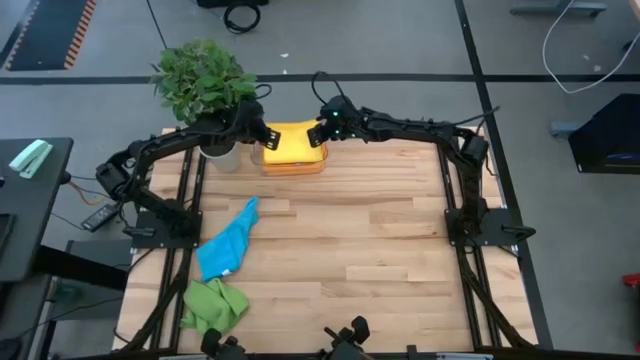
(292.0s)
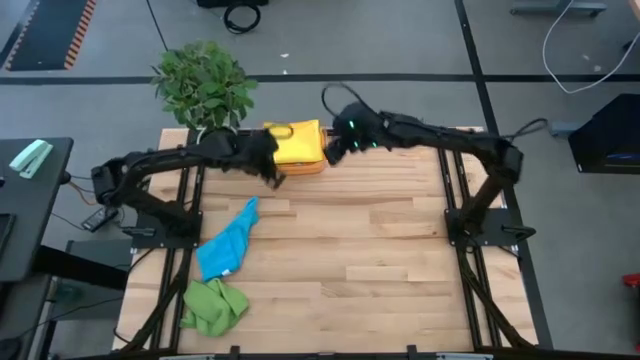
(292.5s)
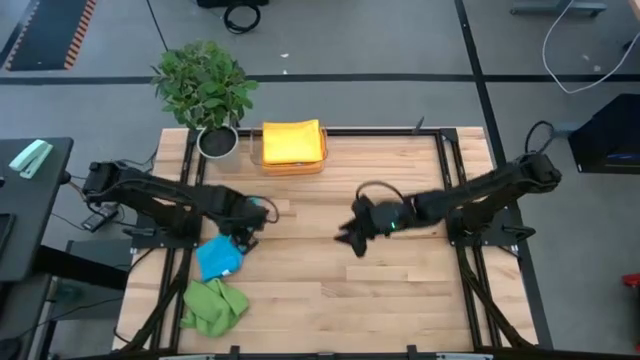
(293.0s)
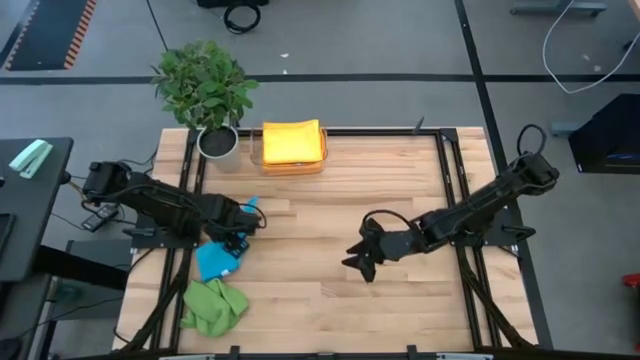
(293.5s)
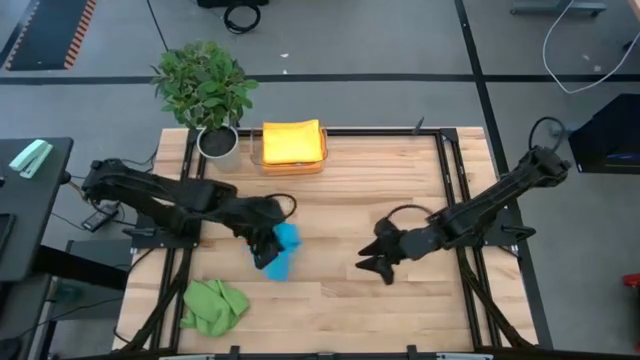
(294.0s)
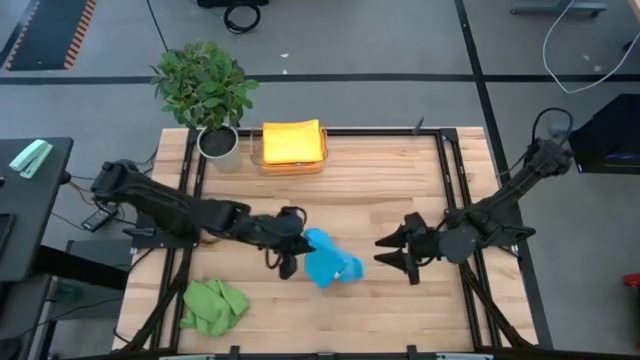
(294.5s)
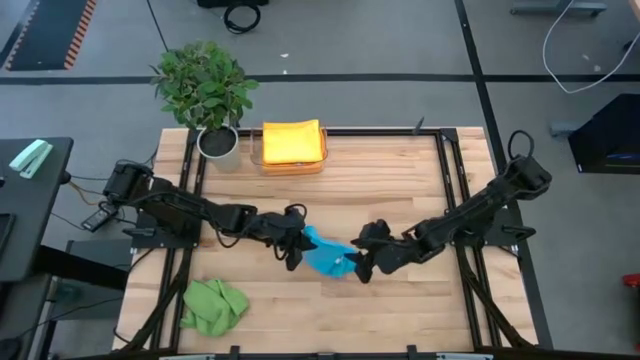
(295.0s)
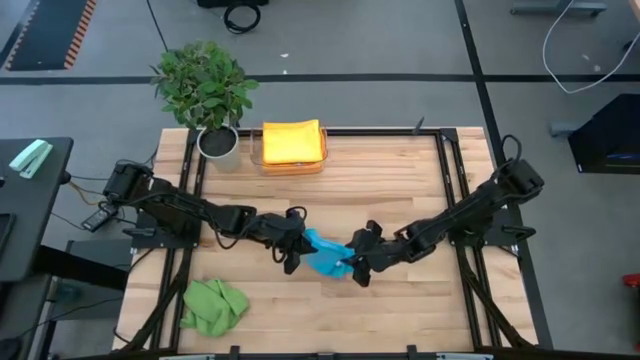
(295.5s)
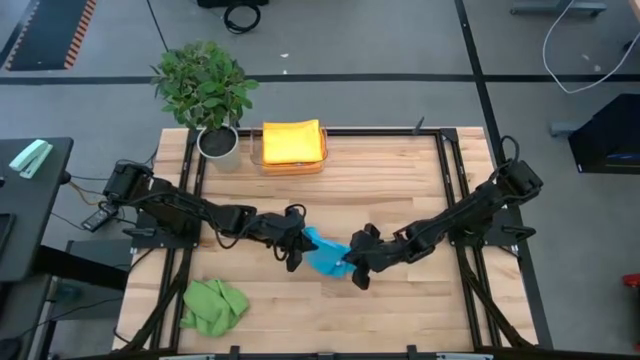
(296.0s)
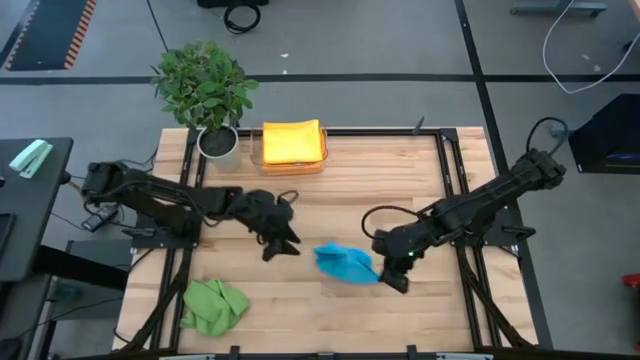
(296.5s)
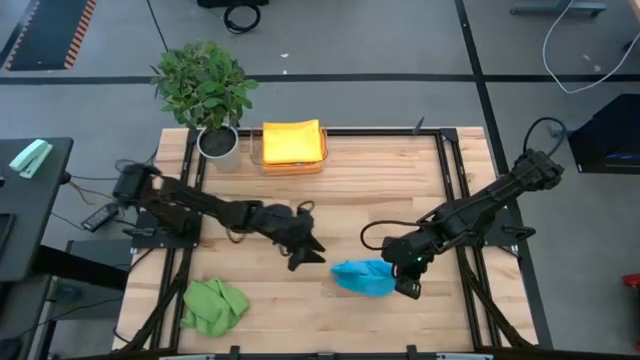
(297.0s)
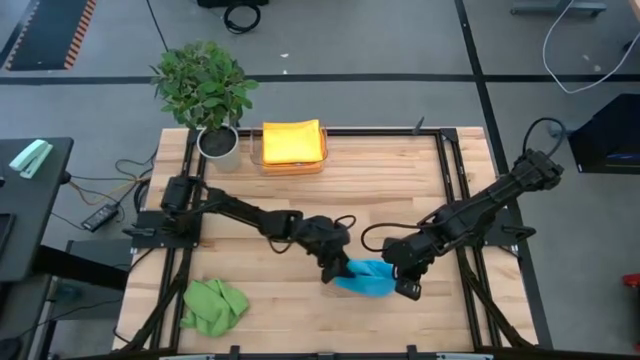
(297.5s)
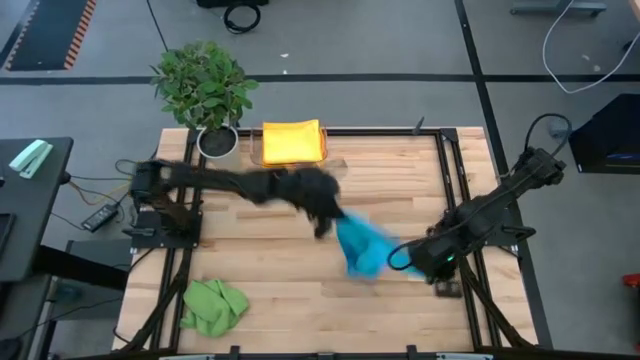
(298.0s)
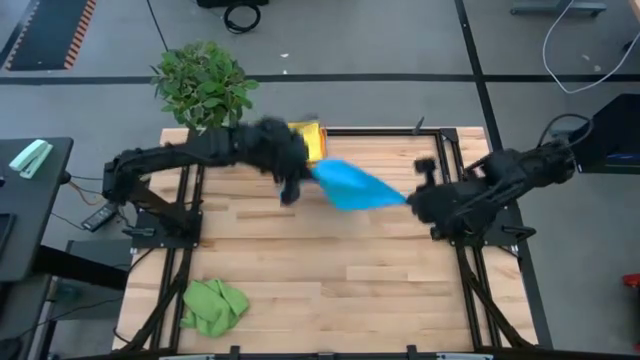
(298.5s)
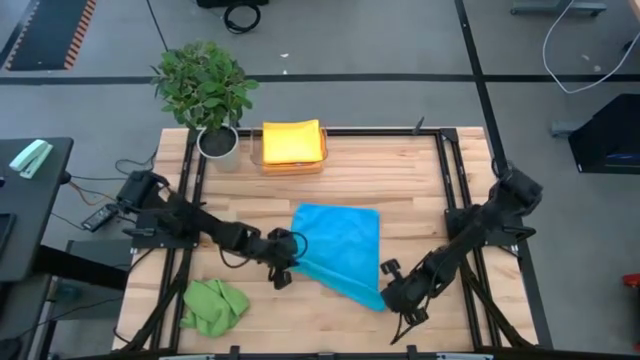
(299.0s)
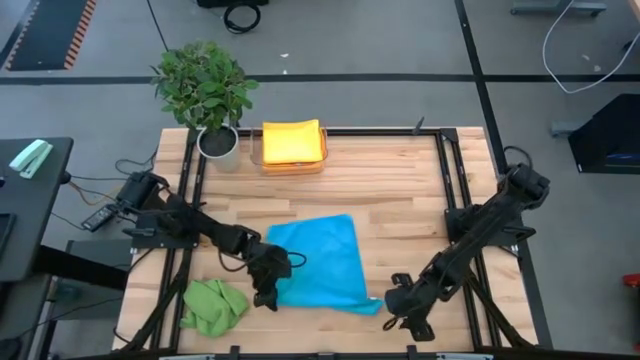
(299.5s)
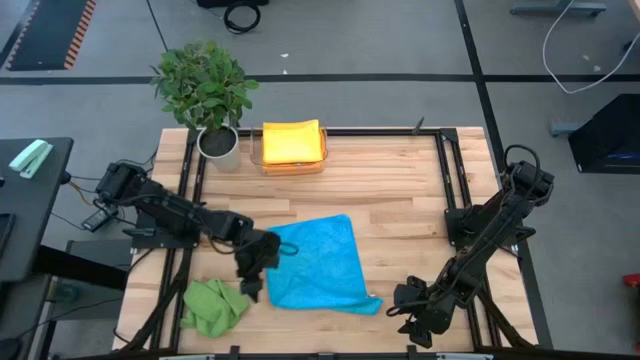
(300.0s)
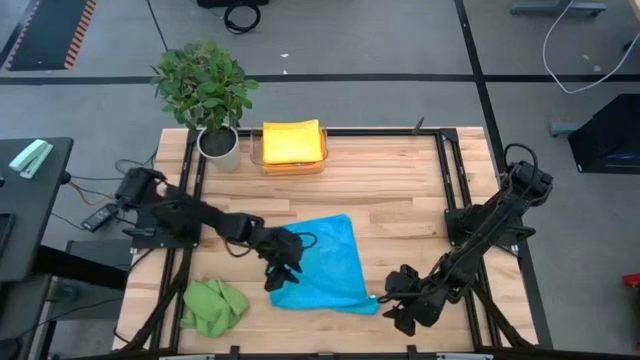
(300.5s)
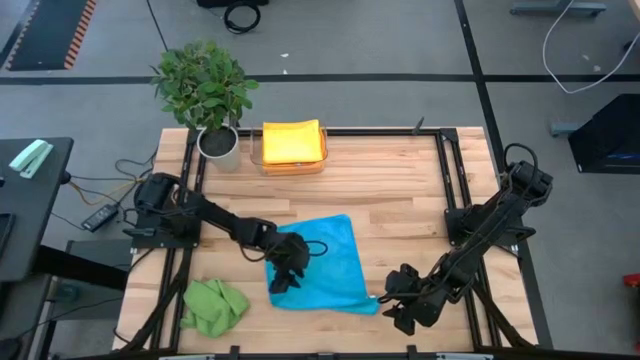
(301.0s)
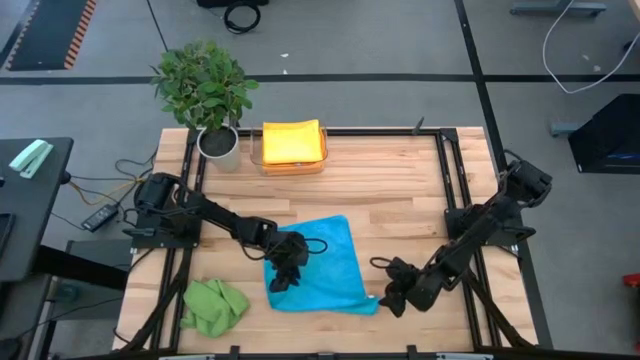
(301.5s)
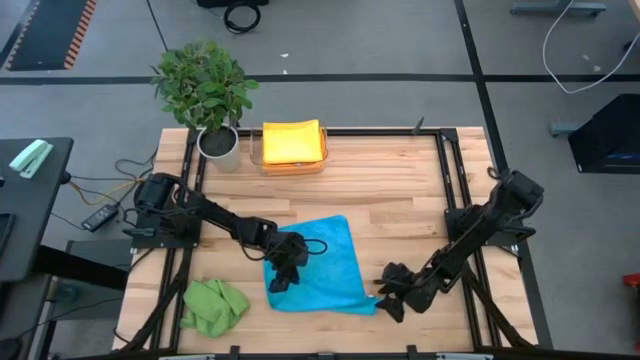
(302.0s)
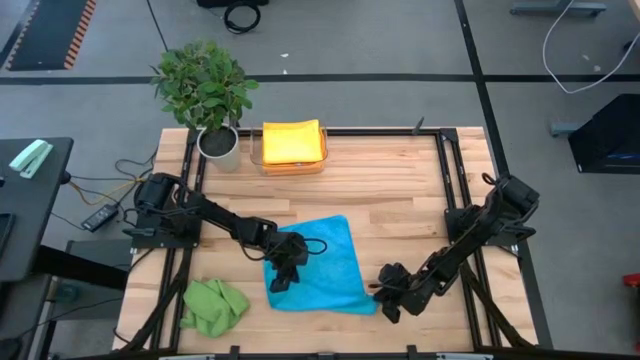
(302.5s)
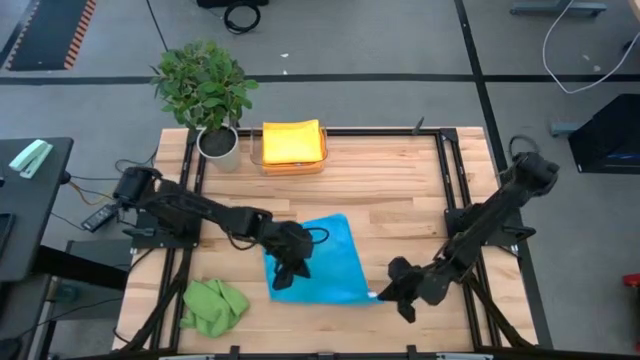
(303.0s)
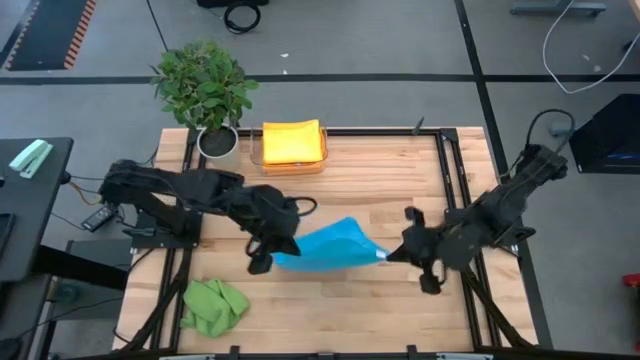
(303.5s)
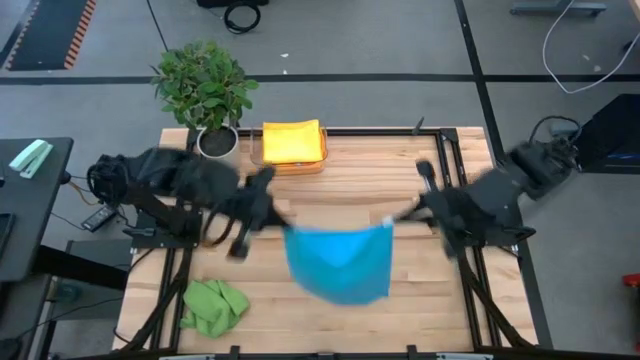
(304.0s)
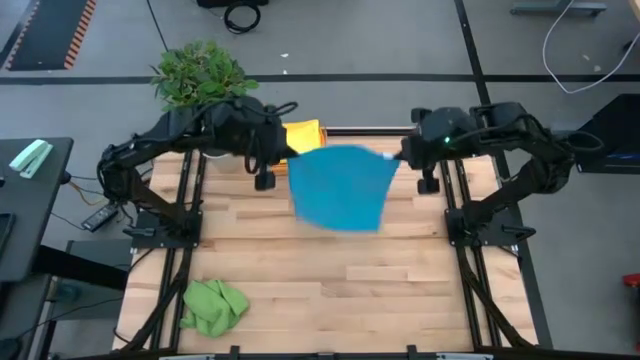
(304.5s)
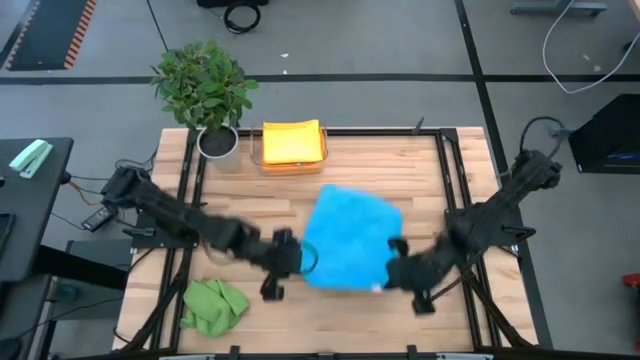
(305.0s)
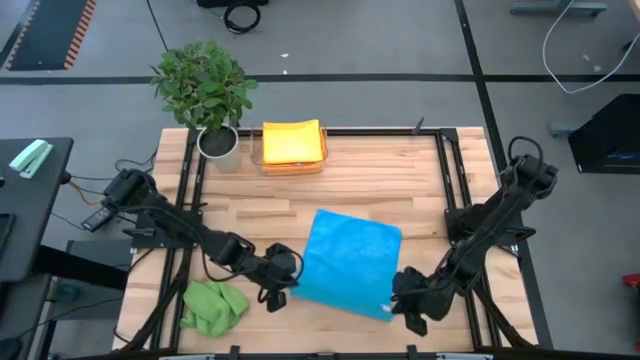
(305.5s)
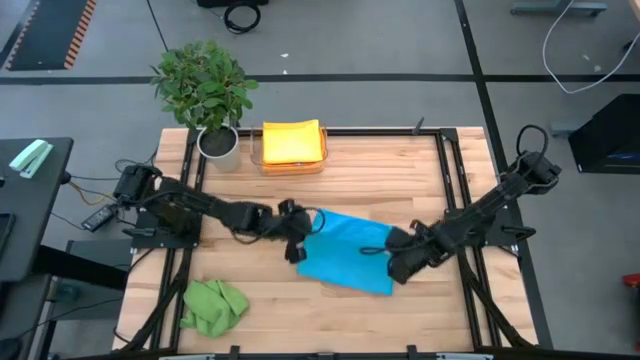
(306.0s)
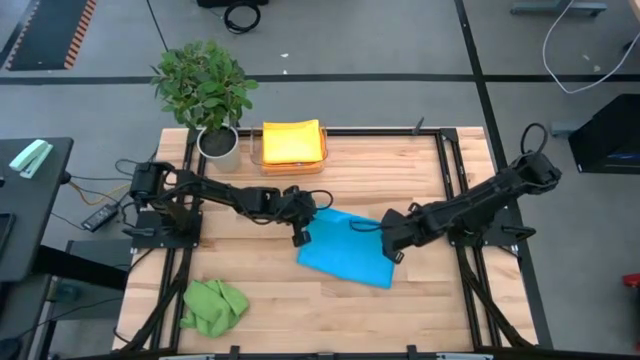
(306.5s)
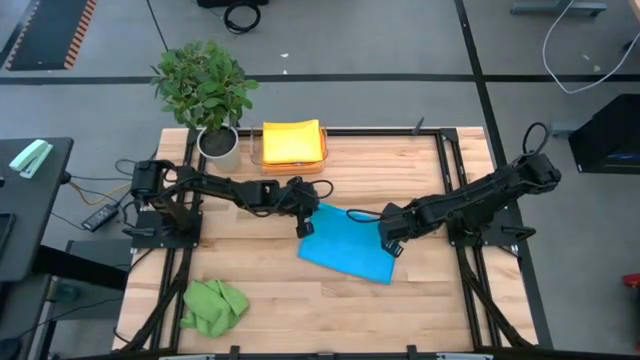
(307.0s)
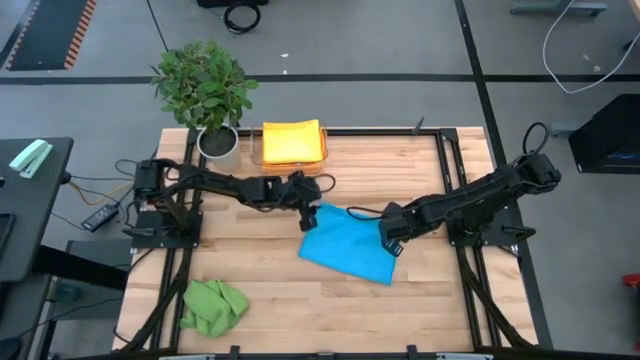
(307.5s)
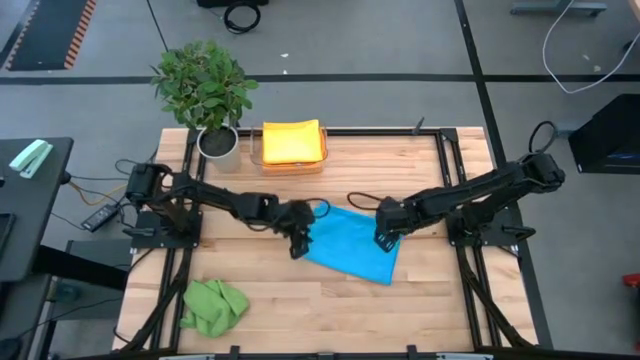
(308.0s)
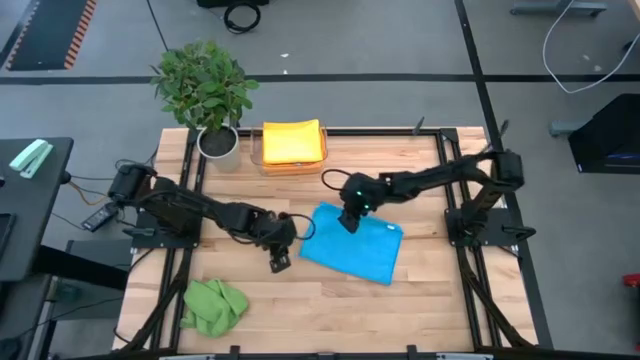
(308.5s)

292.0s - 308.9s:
Task: Fold microfiber towels
Fold the blue microfiber cloth

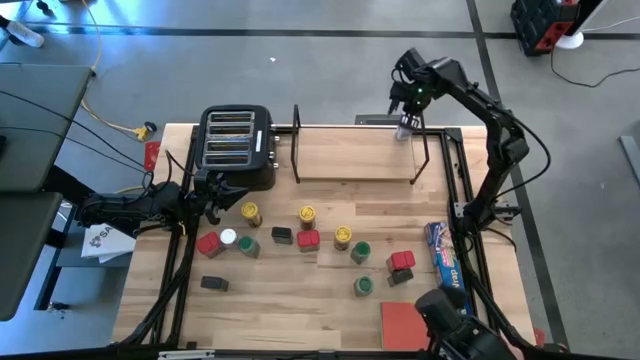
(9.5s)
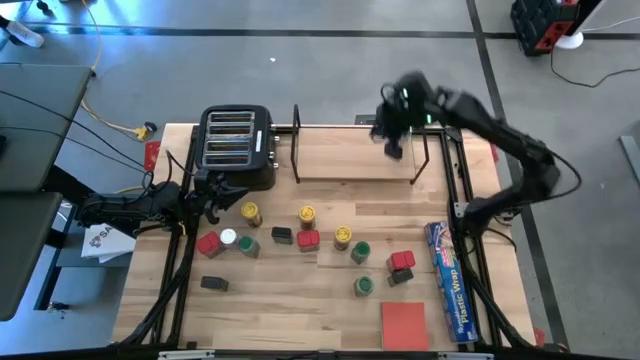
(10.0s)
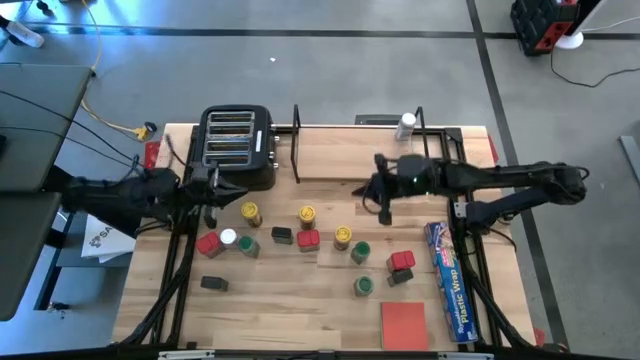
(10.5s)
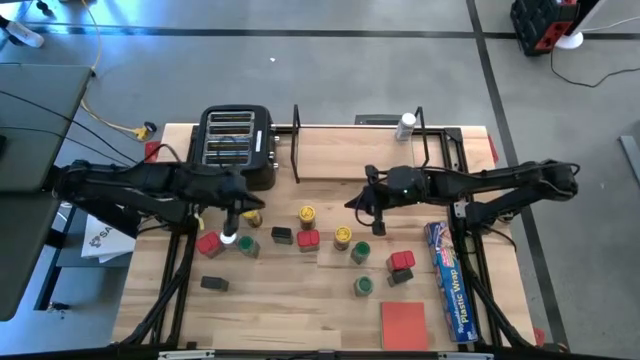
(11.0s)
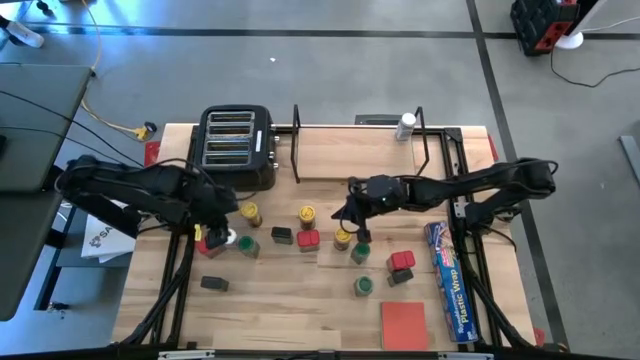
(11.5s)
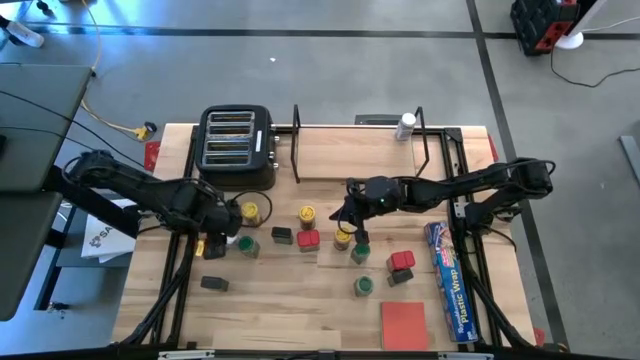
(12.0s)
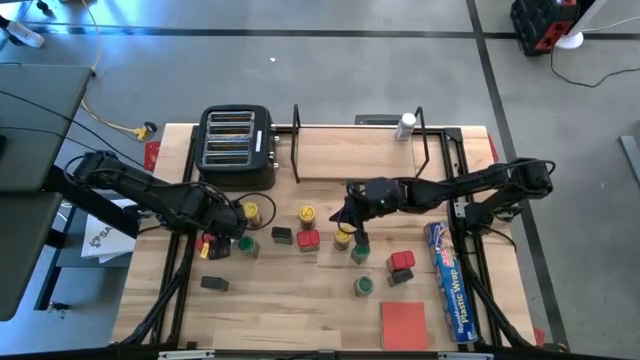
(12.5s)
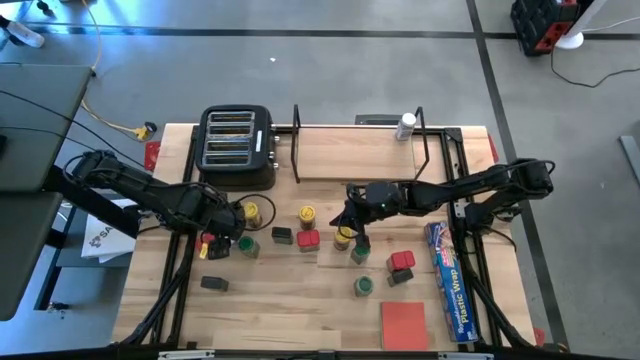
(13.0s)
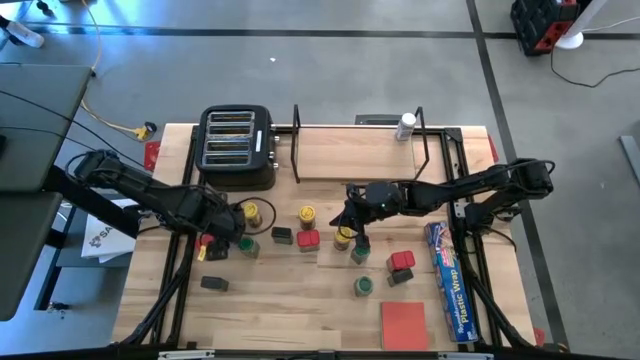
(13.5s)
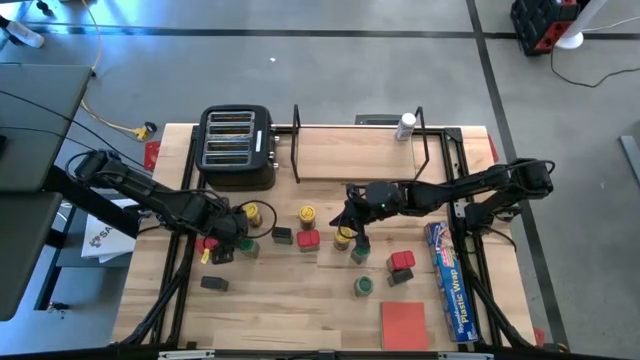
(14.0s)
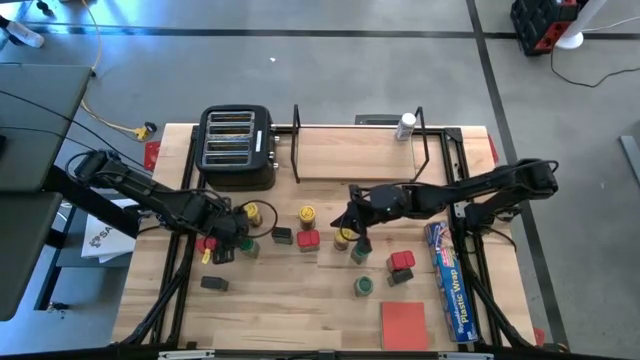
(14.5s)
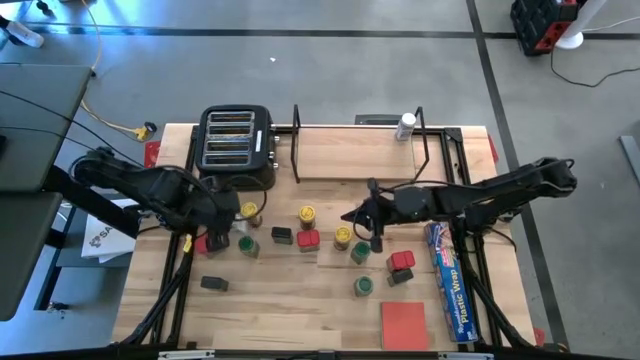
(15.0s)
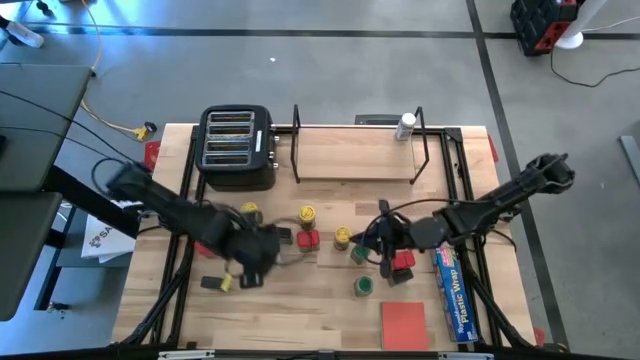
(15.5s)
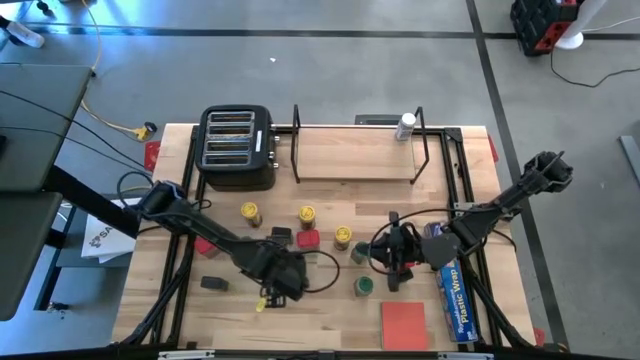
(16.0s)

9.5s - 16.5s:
Task: Shelf spices
Put the white seasoning bottle on the shelf aligned with the other white seasoning bottle
